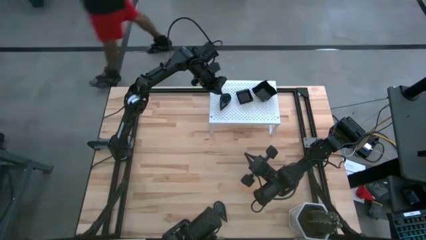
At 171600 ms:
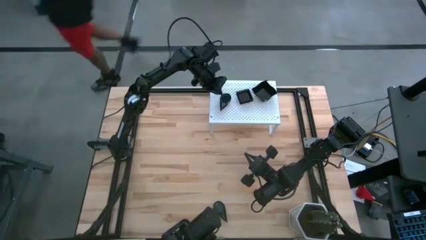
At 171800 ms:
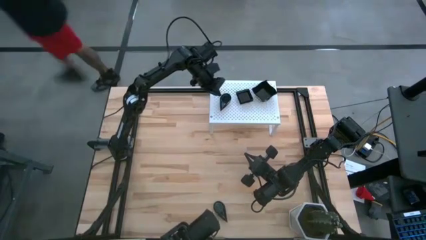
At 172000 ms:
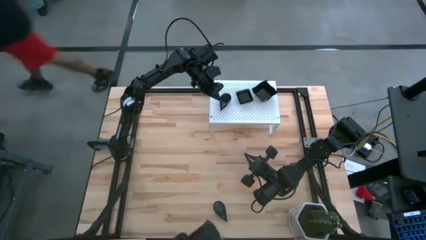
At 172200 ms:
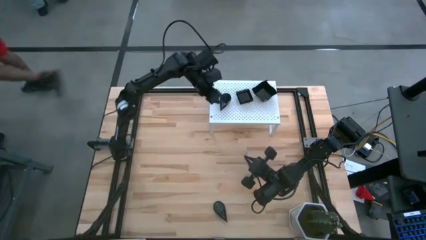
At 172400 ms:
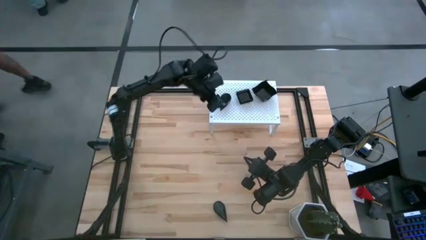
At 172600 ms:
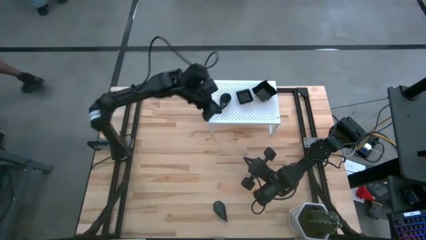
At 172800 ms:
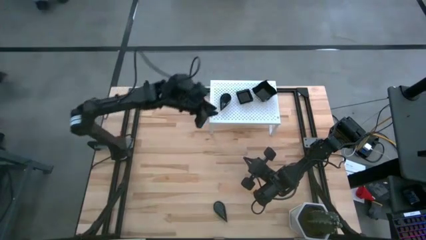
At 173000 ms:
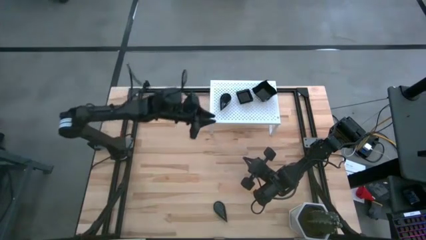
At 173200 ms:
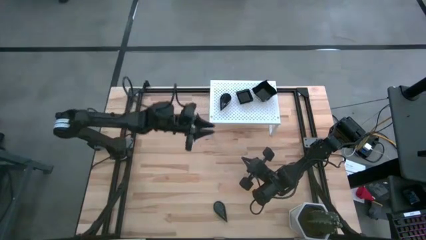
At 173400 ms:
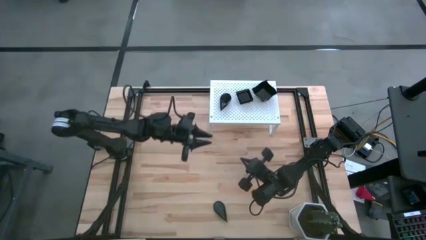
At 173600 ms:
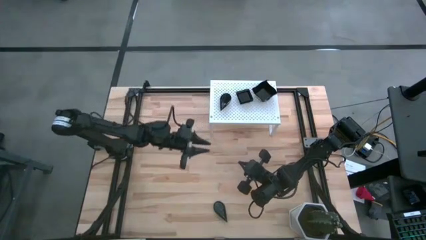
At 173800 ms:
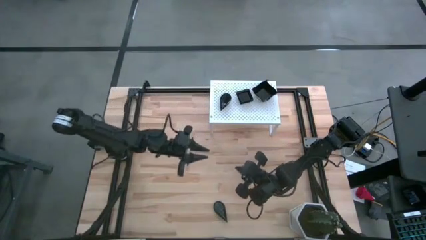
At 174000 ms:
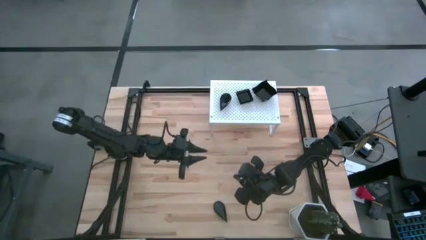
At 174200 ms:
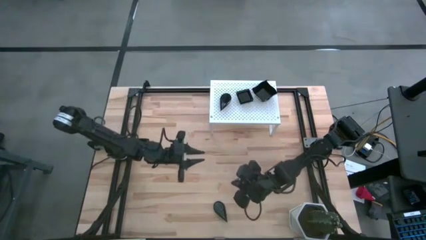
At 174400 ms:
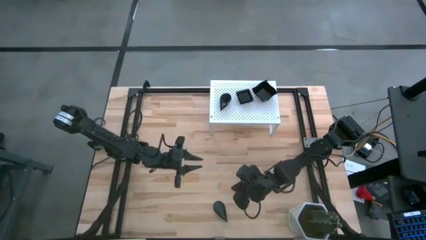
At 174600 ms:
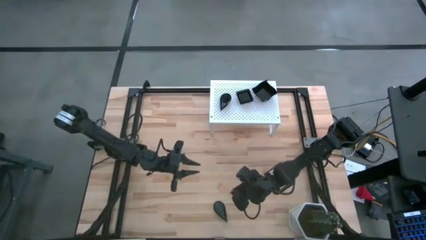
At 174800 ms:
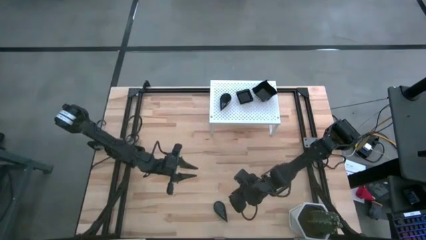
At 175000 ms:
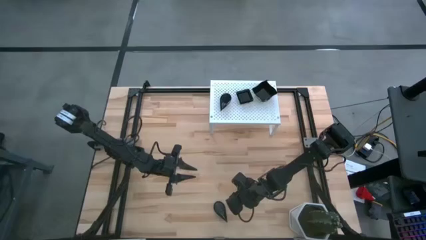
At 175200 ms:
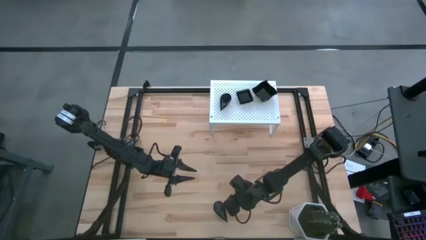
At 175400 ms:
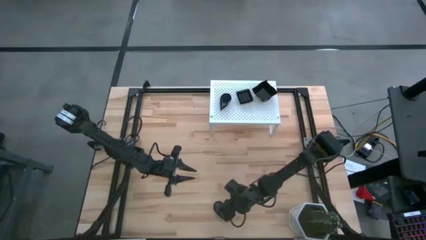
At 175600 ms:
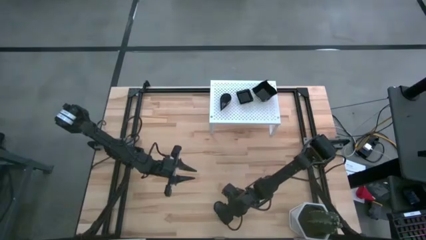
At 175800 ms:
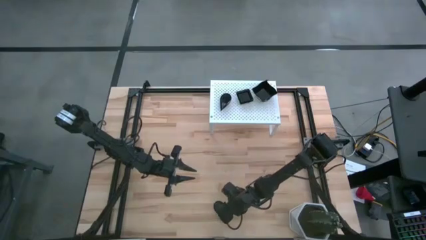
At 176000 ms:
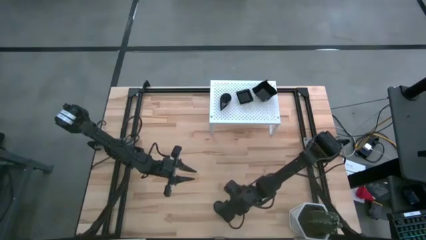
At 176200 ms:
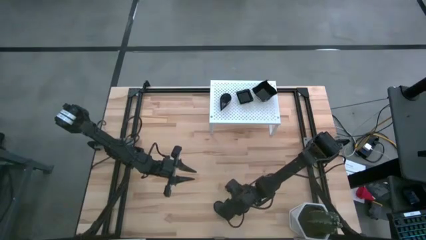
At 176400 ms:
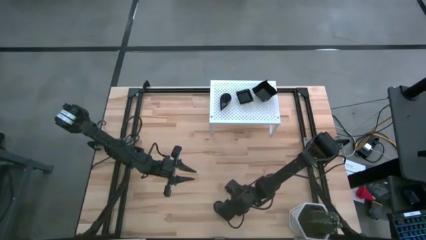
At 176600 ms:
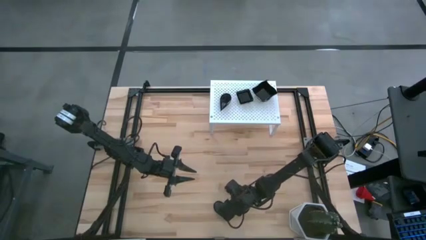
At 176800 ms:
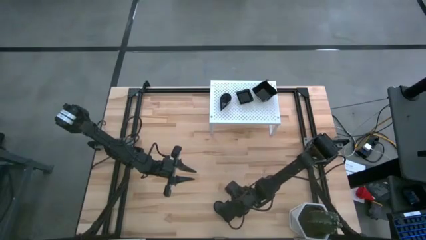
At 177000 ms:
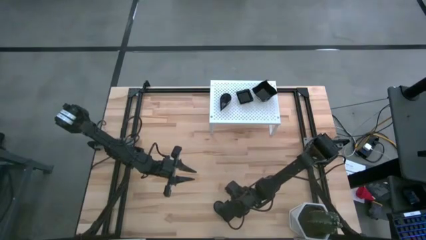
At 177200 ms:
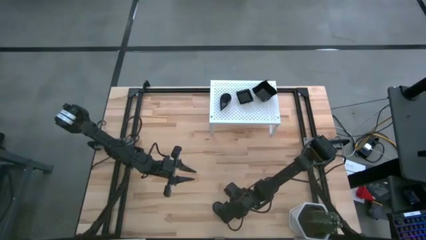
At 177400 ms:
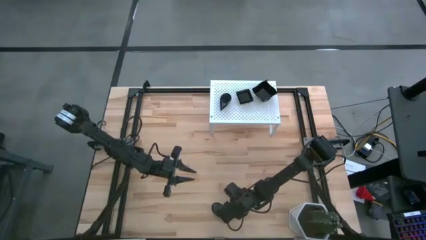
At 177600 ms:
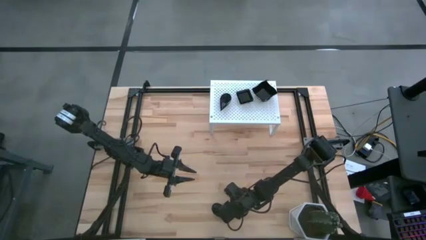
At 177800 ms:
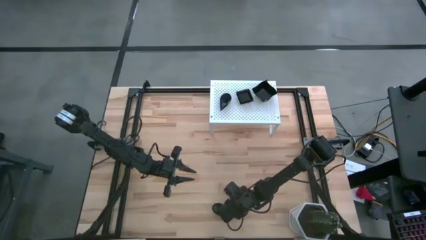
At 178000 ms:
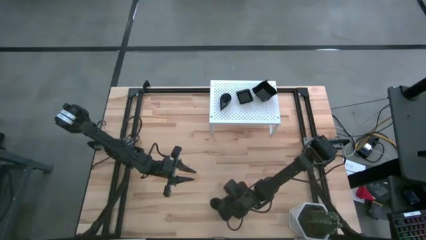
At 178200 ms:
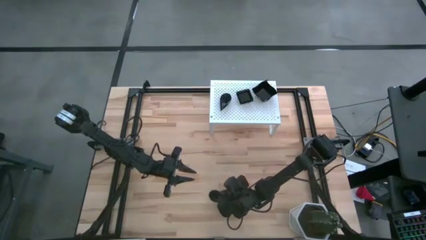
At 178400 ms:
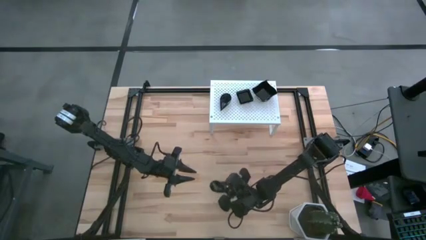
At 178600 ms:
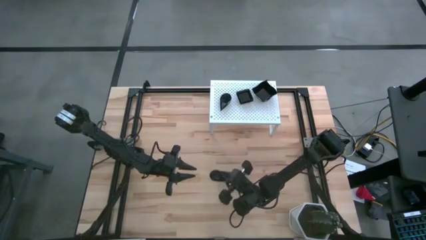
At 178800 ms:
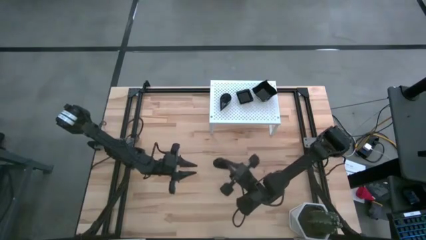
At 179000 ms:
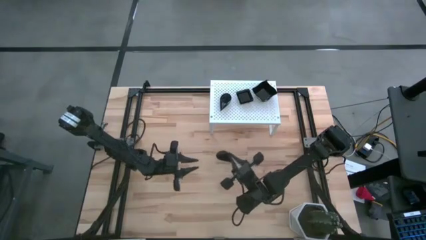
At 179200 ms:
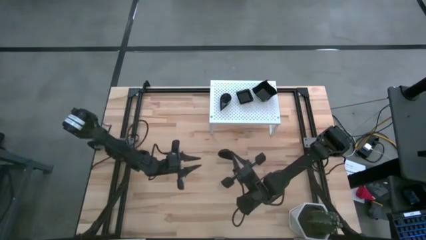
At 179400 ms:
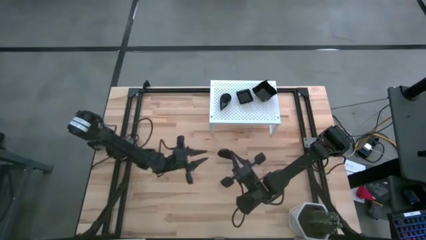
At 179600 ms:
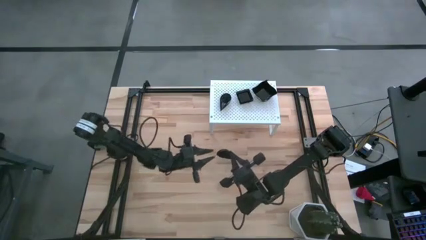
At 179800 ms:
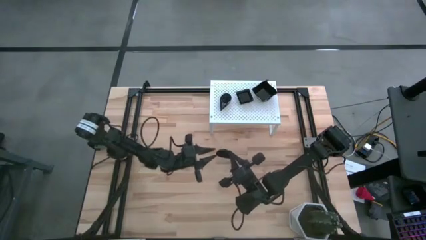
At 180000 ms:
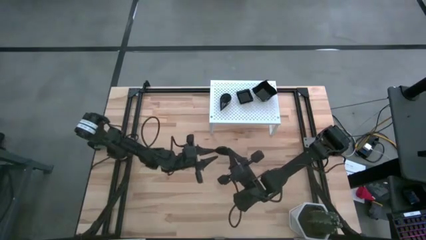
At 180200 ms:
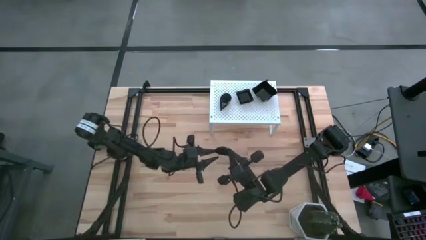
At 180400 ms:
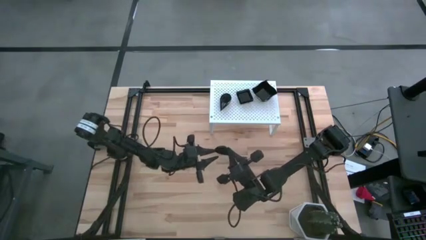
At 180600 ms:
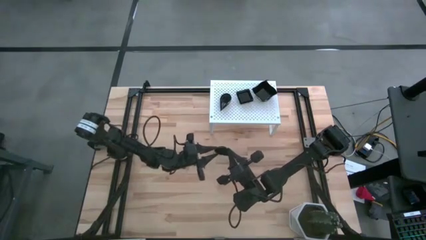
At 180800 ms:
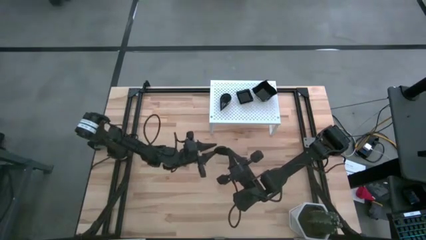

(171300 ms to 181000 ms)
Task: Pick & Place Mini shaped plates
Stack the drop shaped plate on top of the drop shaped plate on the shelf

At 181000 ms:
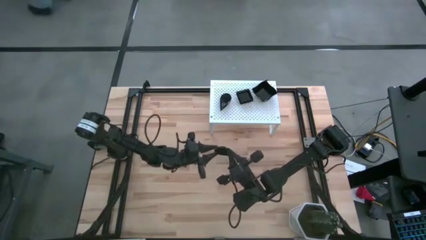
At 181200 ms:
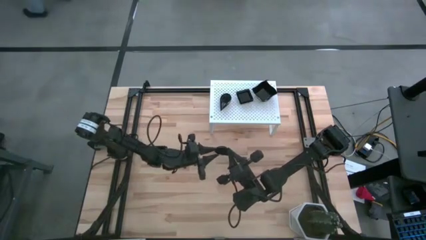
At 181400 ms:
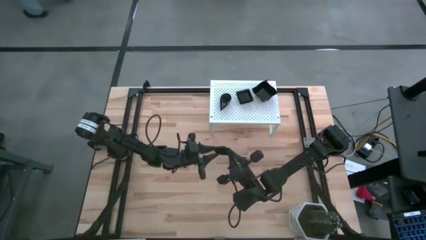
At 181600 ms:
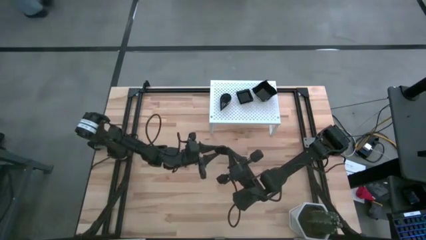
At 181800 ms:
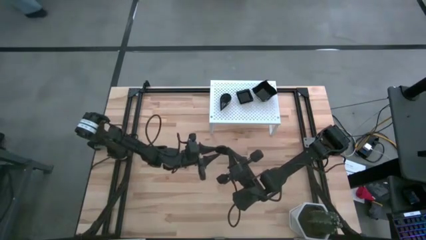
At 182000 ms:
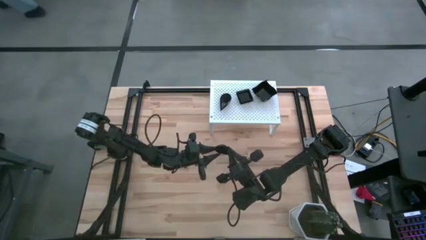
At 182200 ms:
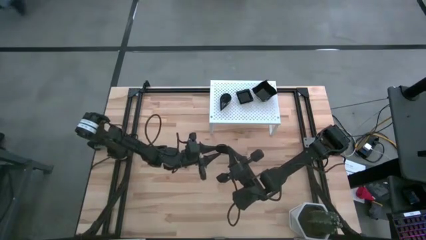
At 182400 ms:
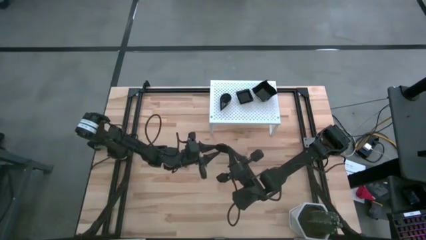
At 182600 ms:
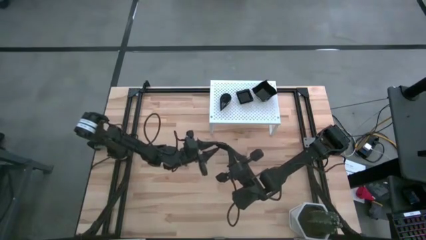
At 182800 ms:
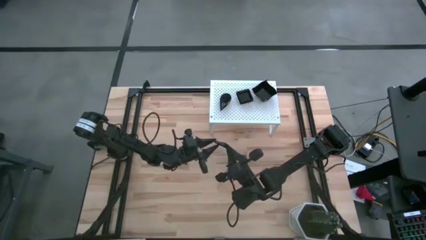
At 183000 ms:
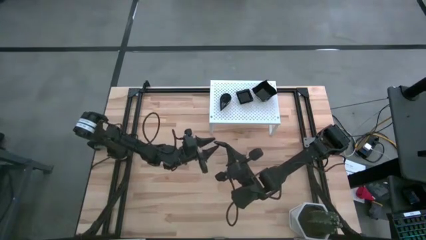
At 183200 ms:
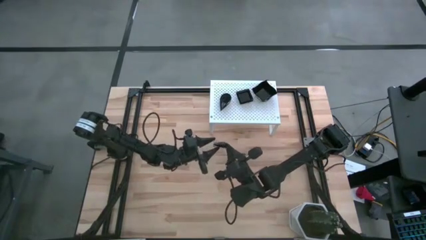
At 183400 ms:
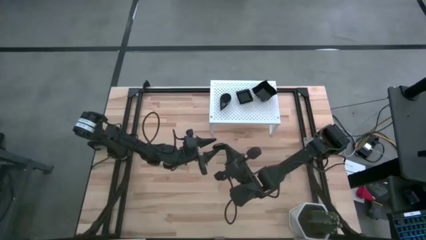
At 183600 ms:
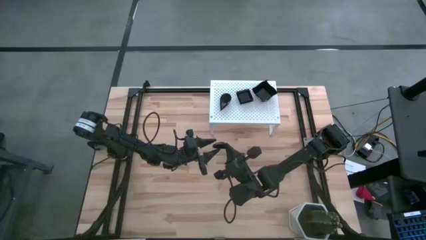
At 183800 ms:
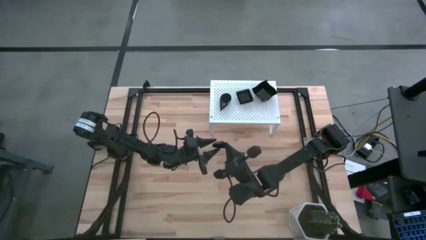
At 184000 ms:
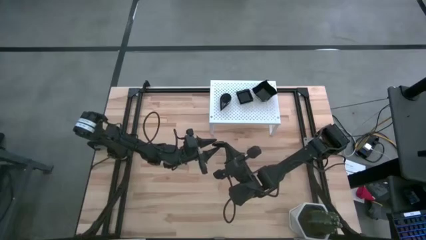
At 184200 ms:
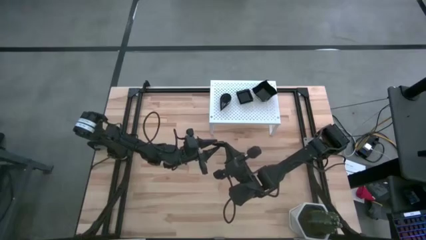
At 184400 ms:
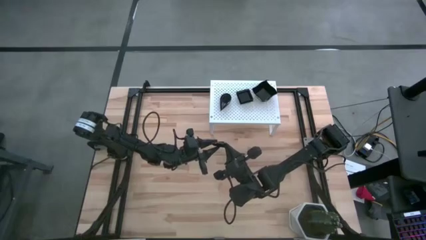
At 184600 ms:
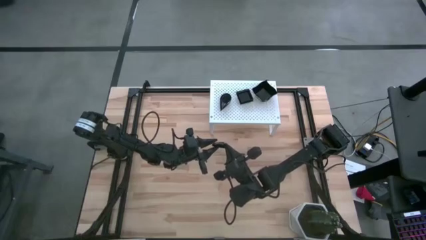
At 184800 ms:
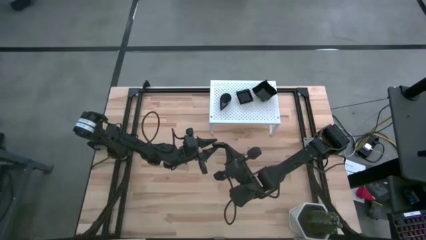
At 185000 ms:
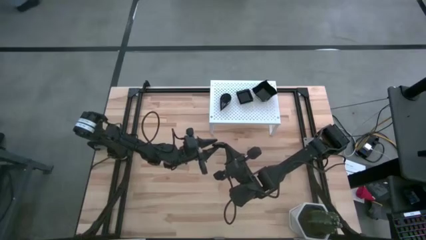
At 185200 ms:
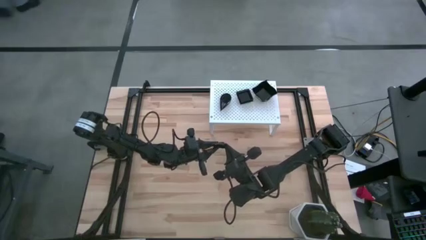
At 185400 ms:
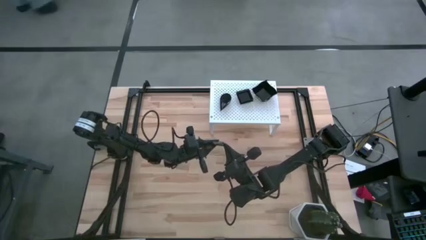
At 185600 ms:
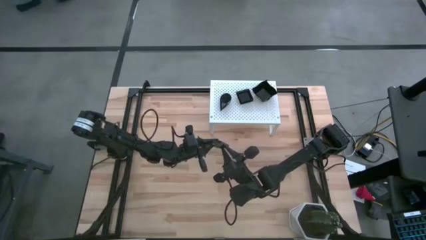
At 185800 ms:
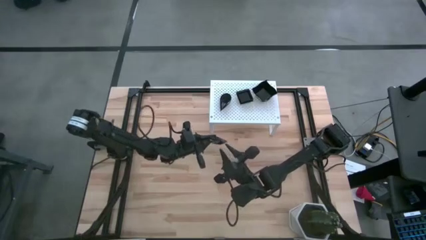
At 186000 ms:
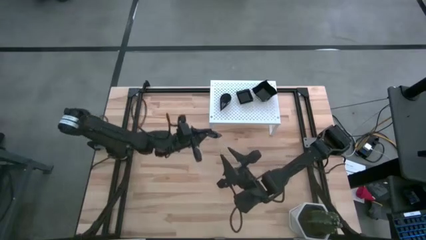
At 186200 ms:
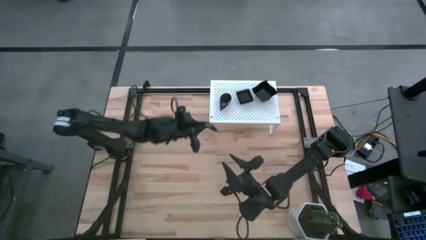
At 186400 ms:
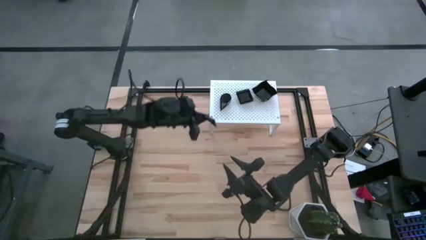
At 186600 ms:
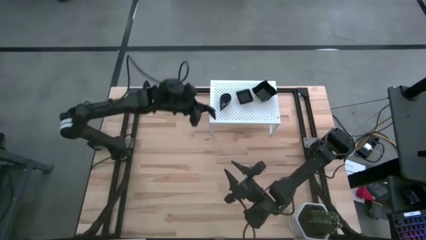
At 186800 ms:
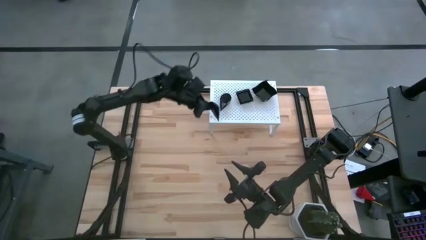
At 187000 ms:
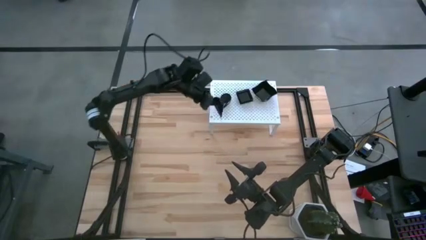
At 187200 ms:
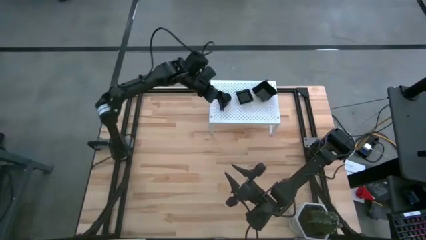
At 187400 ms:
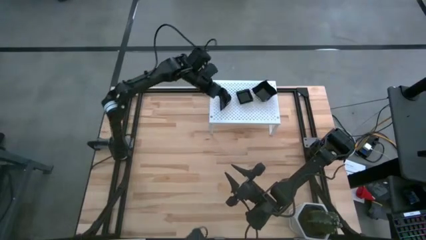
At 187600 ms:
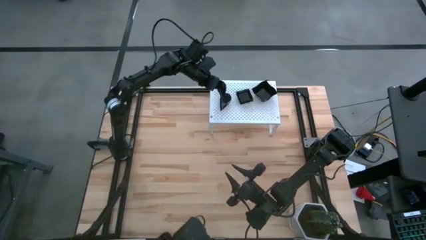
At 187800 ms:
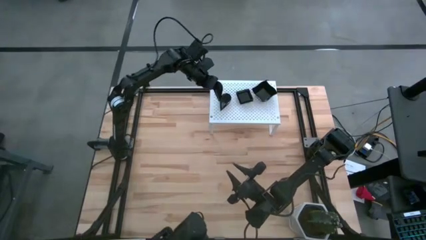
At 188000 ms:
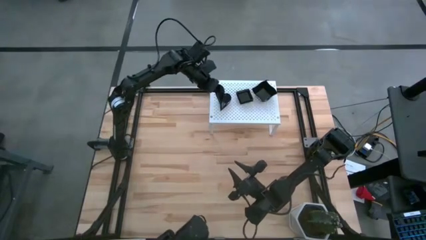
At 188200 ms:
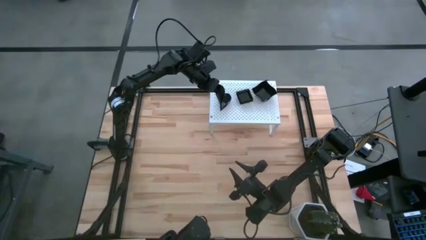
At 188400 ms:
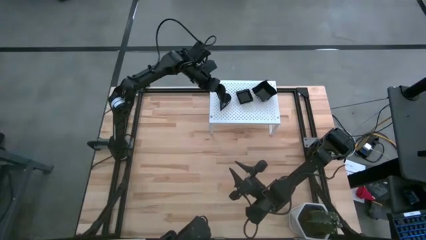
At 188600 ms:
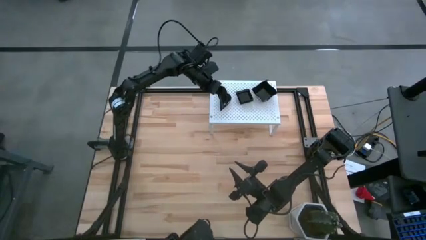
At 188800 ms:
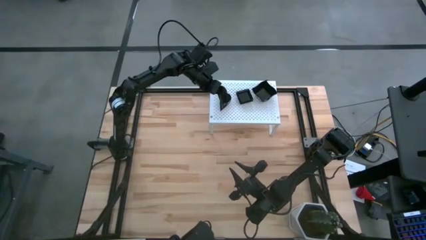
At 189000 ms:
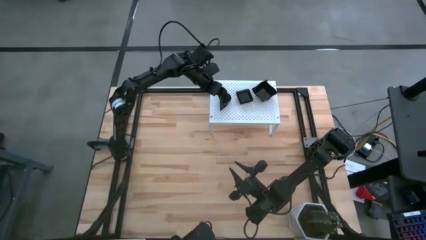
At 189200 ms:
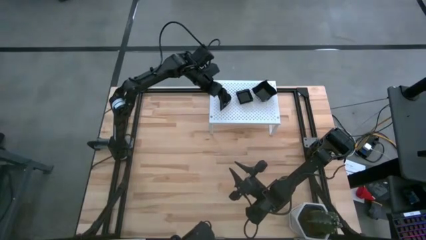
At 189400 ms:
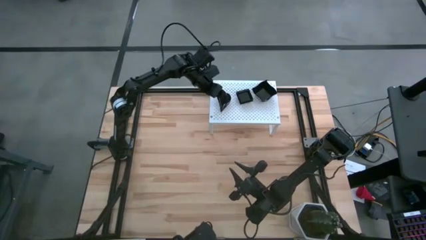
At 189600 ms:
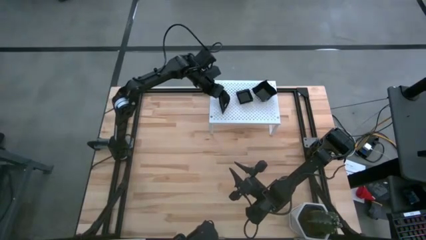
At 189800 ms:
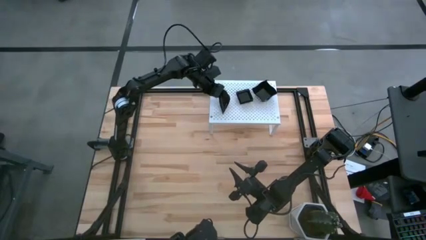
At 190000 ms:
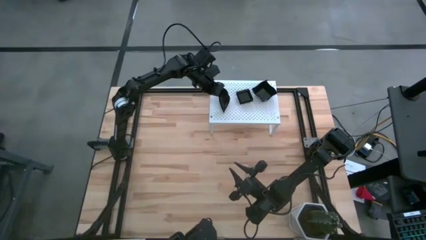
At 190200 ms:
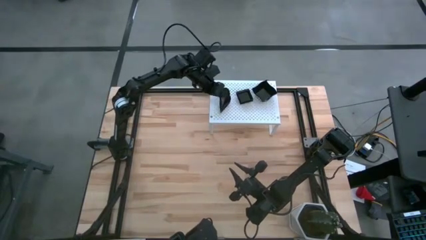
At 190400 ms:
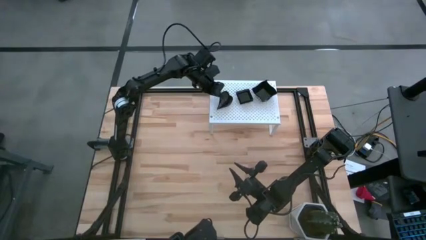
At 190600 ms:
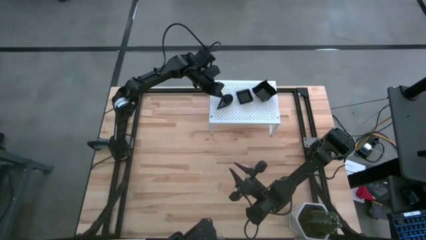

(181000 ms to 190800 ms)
Stack the drop shaped plate on top of the drop shaped plate on the shelf
